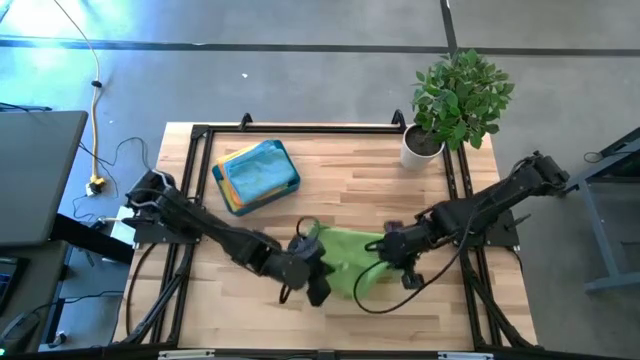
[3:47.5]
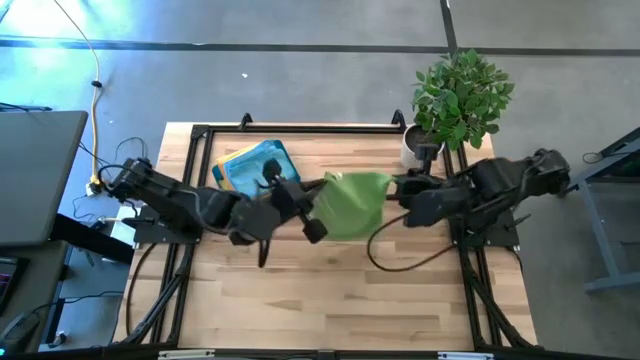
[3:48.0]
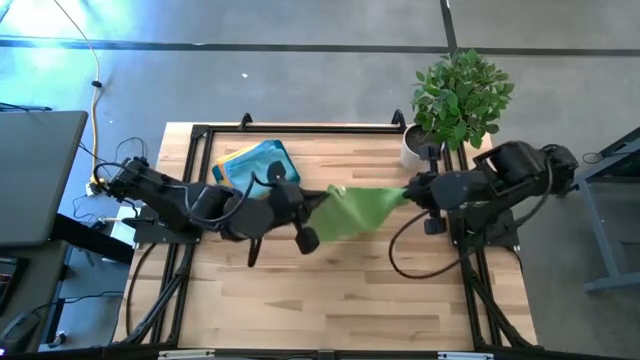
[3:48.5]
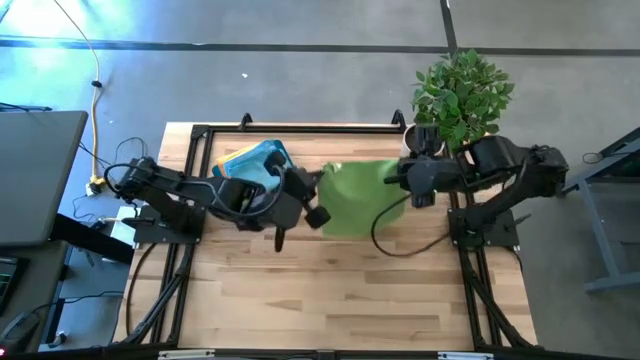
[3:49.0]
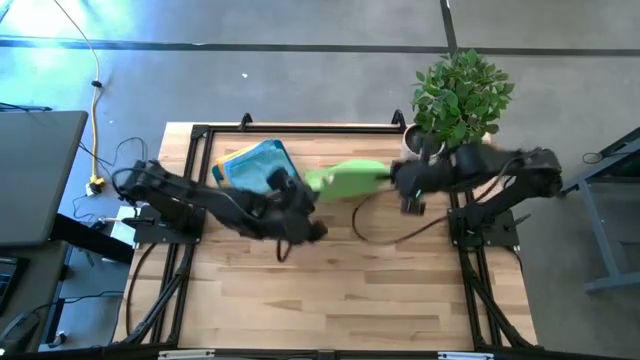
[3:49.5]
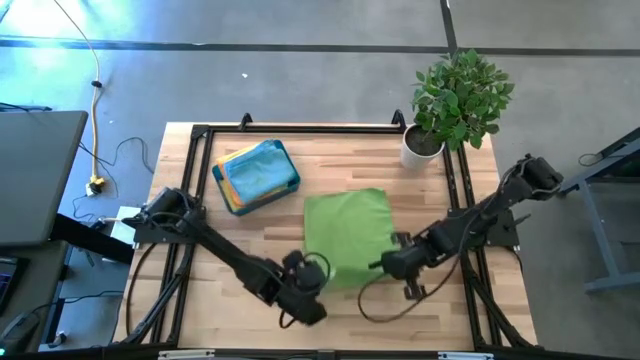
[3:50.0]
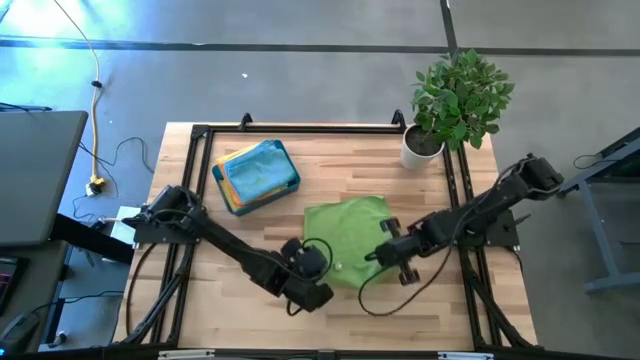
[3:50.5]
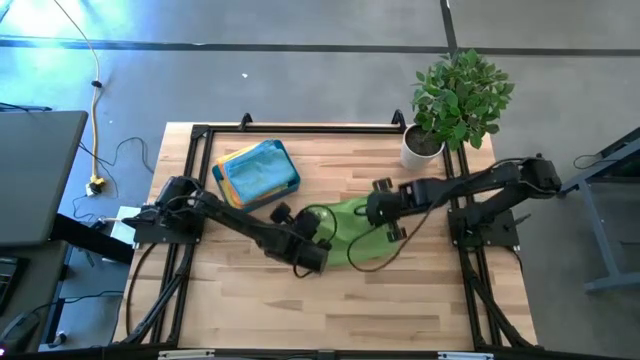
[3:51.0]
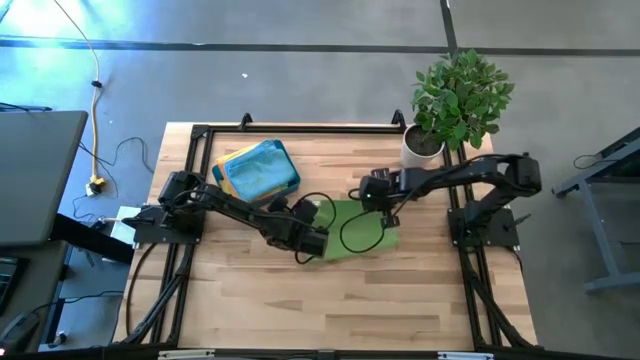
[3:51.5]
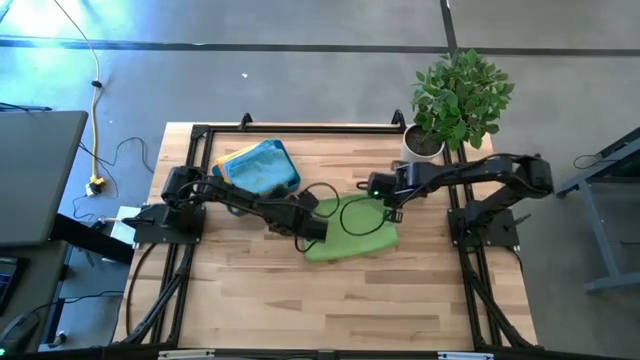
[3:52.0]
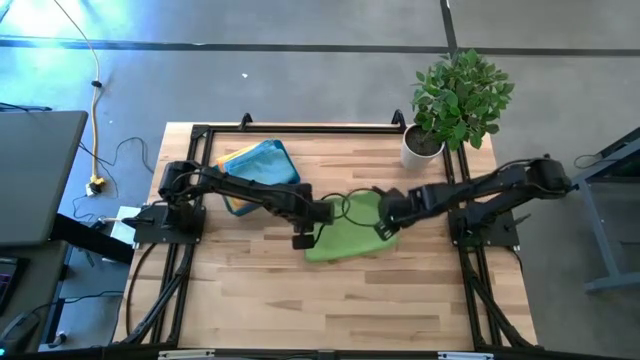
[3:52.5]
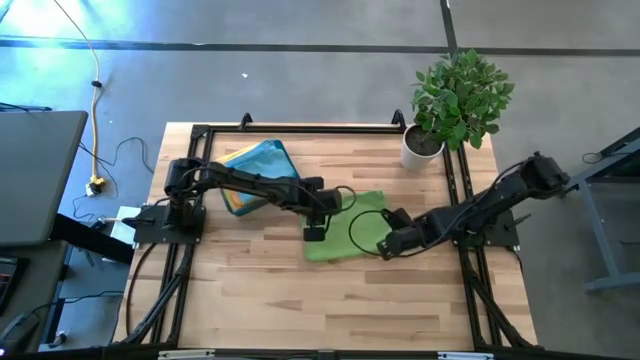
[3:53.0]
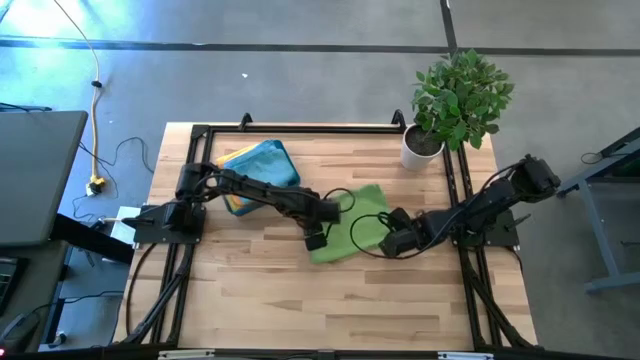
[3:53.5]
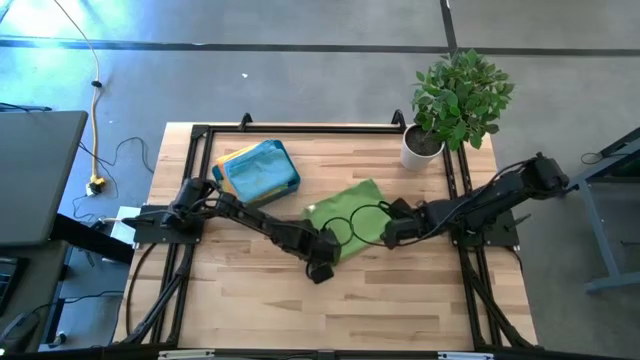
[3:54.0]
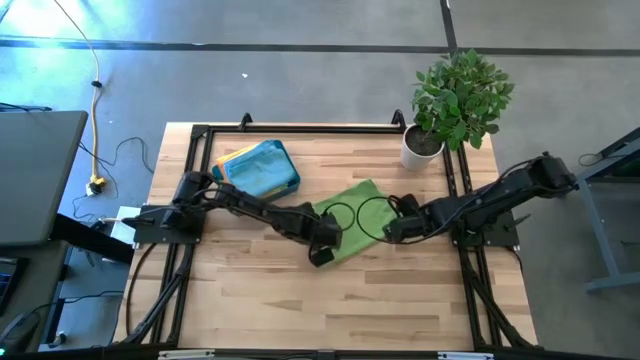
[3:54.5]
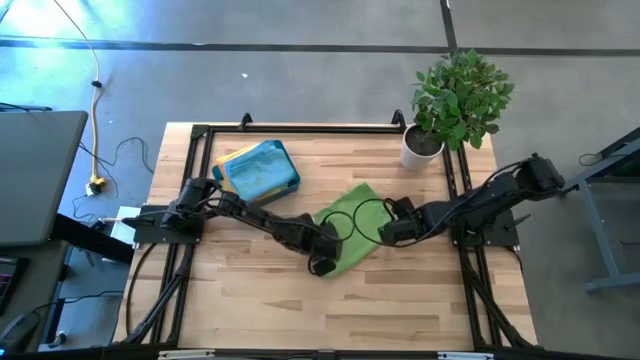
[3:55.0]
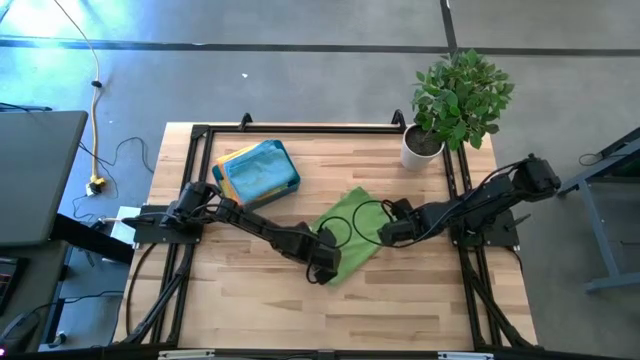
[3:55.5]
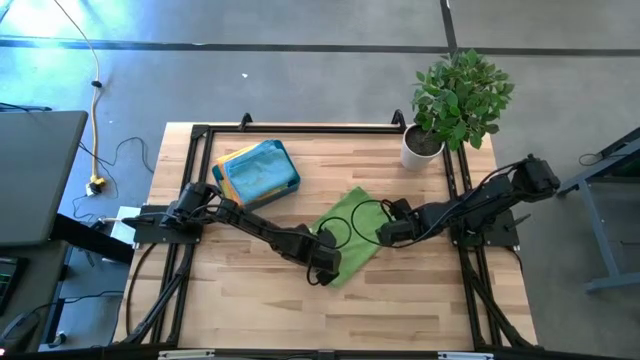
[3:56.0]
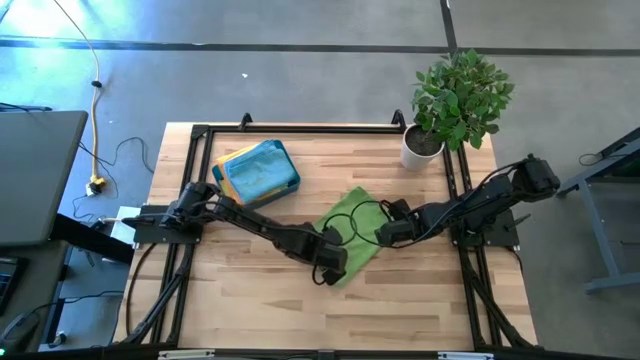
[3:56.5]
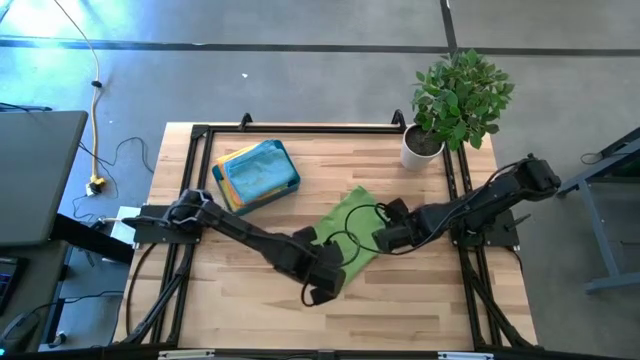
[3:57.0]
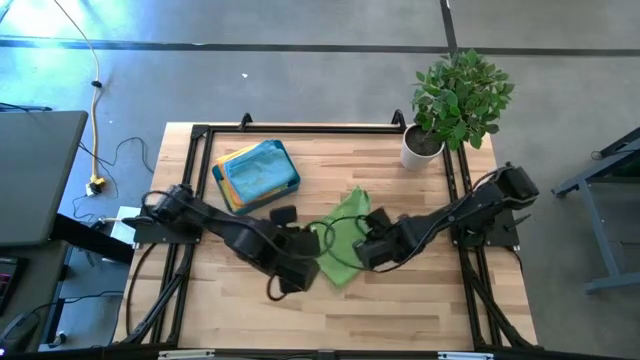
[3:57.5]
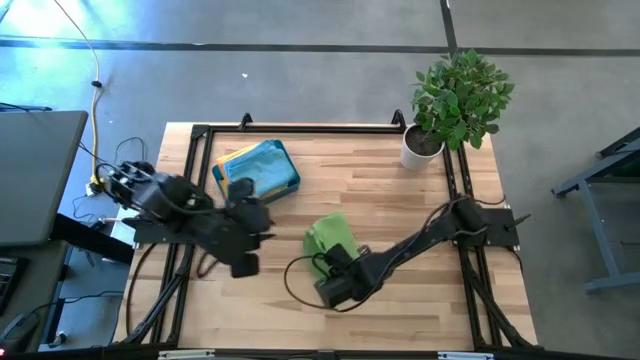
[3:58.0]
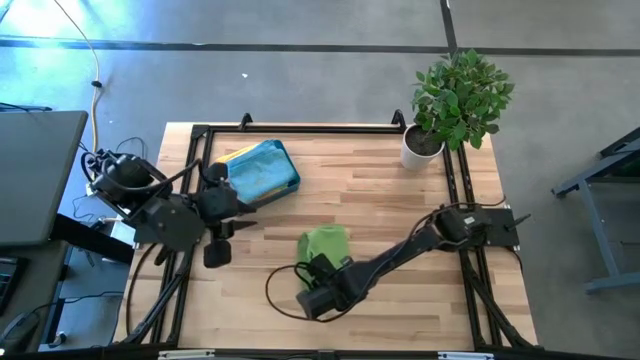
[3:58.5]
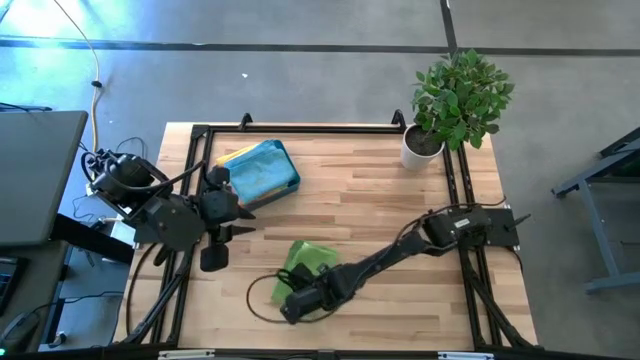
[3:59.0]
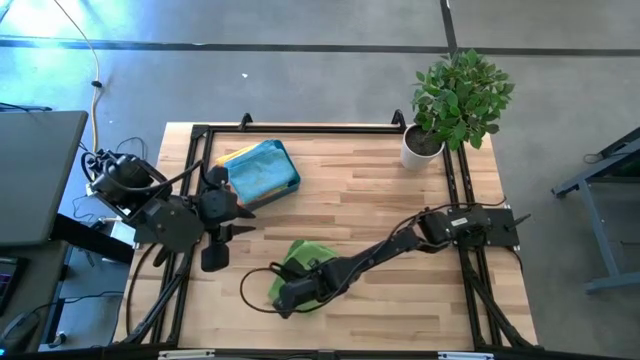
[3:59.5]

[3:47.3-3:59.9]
Task: Fold microfiber towels
Fold the green microfiber cloth

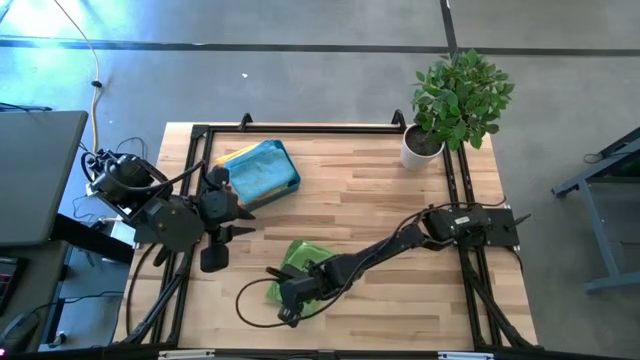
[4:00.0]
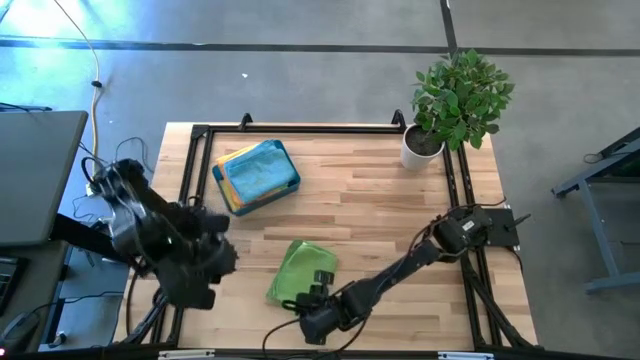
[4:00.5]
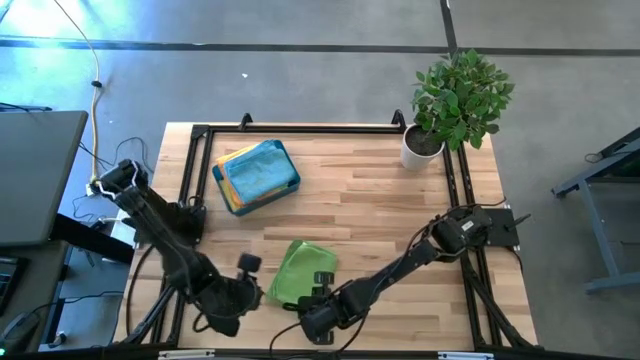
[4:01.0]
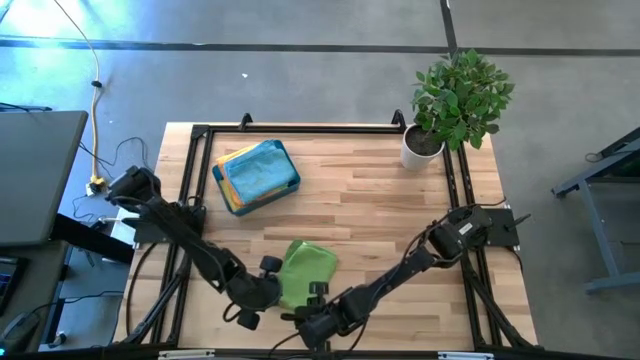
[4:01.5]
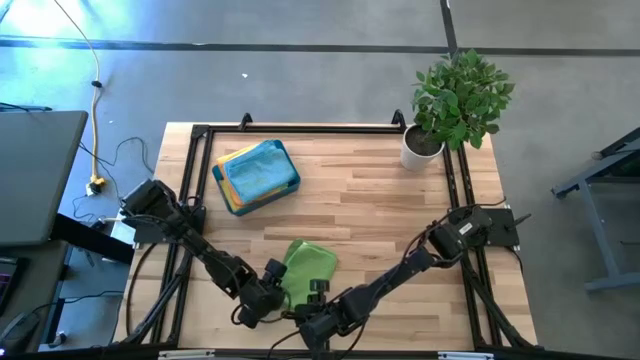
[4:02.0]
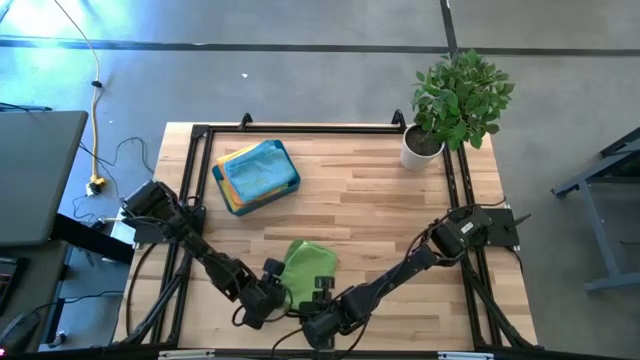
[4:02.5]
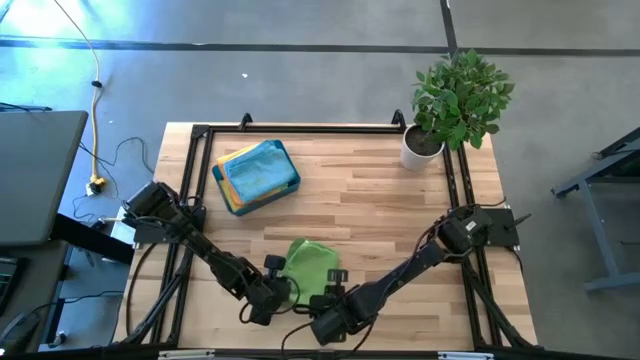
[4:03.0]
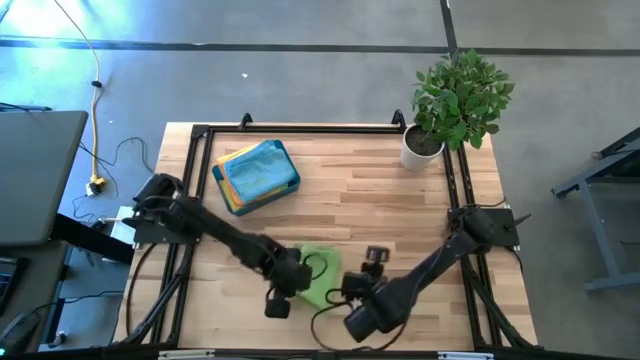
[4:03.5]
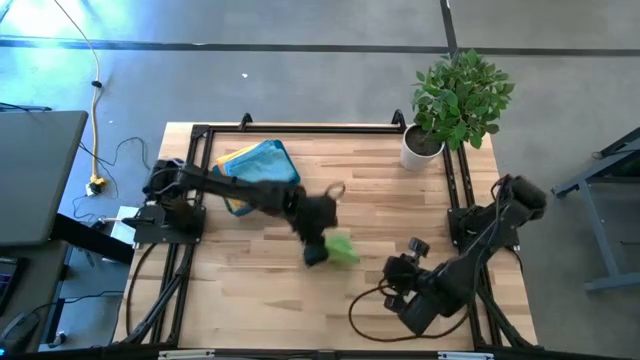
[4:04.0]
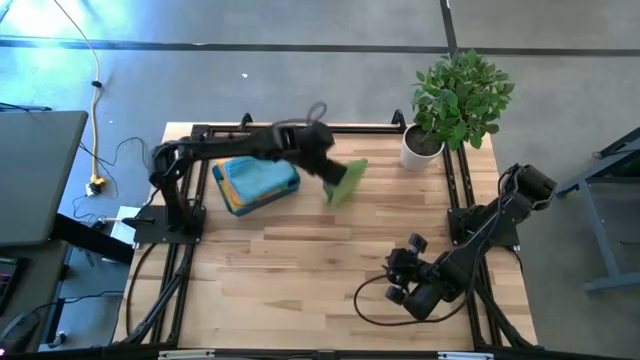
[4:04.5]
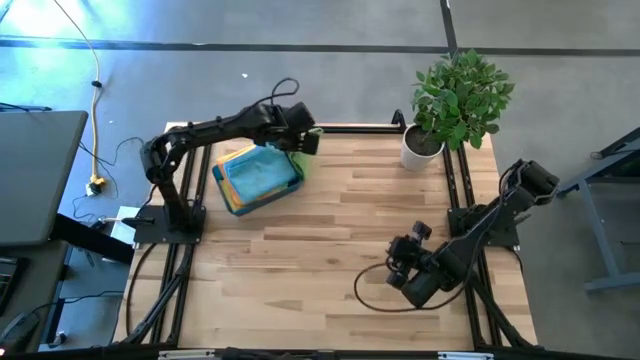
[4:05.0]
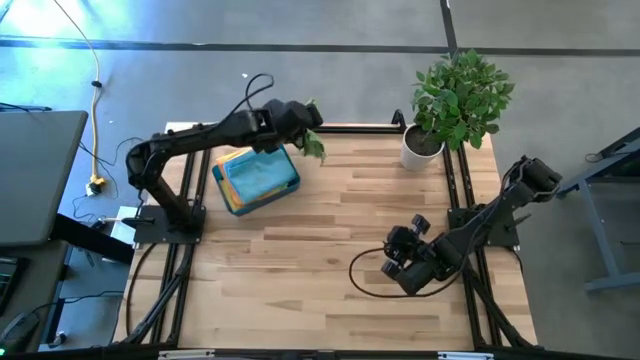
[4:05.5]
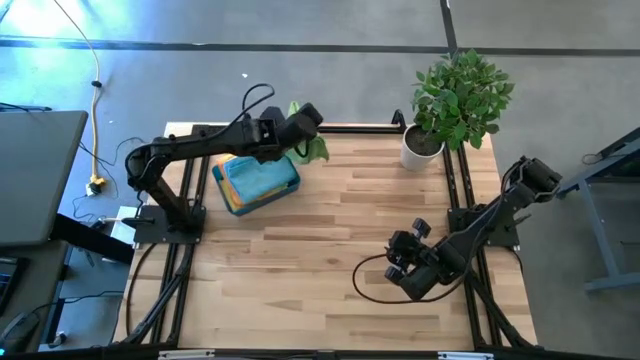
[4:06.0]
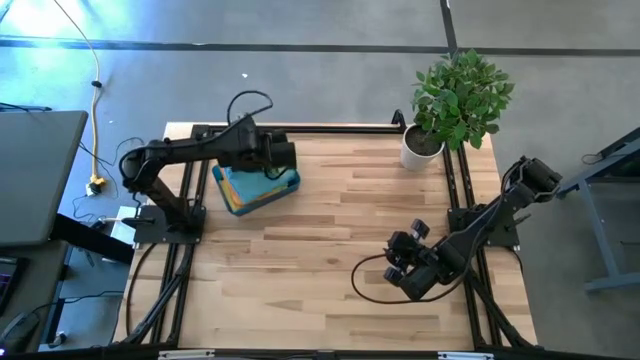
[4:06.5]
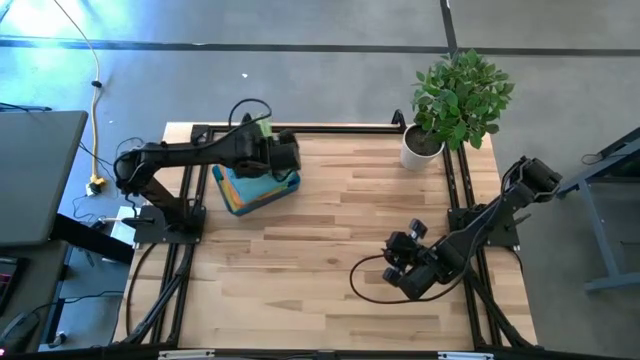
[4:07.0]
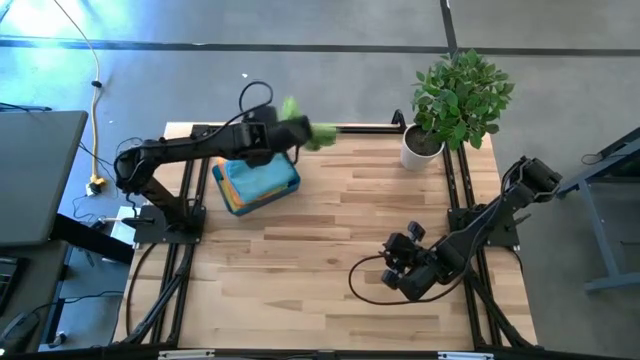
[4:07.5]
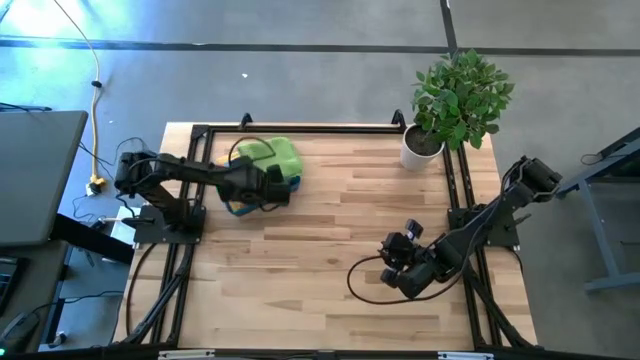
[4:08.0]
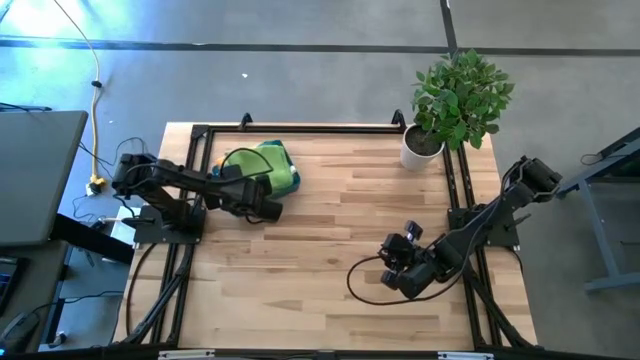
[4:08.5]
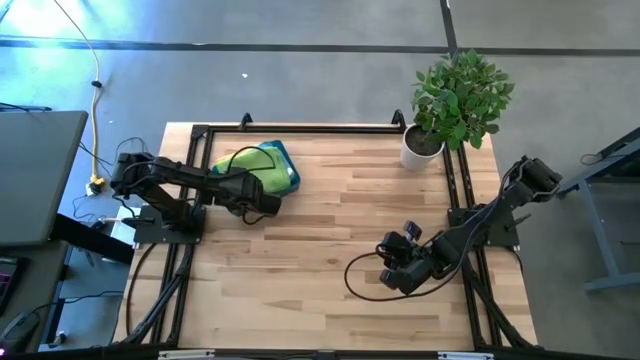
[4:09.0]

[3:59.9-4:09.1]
Put the folded green microfiber cloth into the bin
